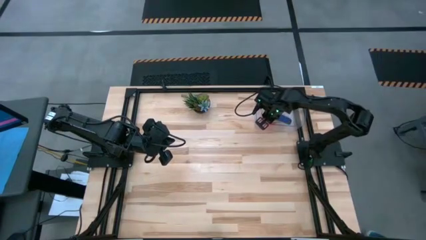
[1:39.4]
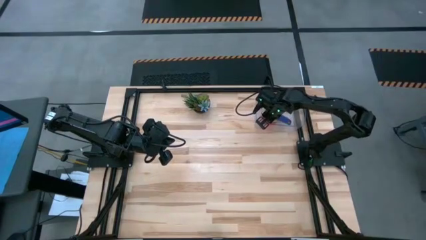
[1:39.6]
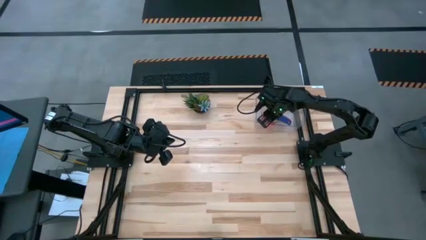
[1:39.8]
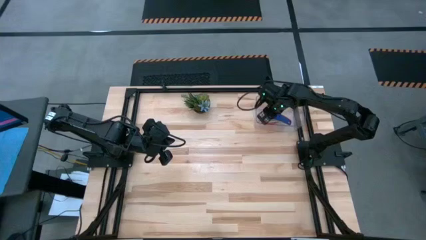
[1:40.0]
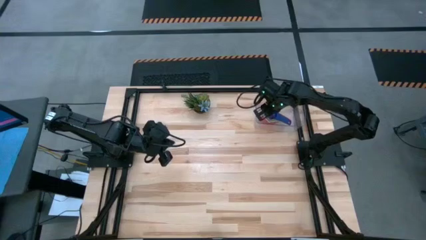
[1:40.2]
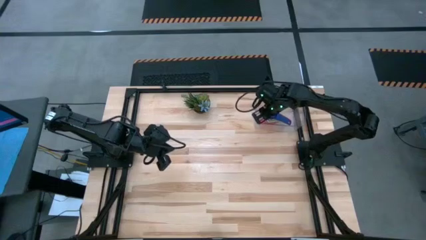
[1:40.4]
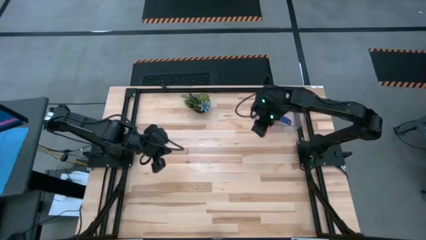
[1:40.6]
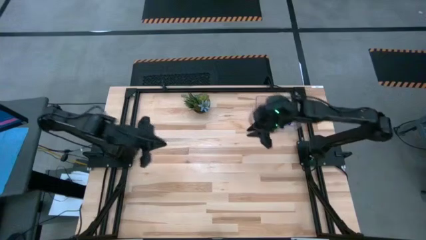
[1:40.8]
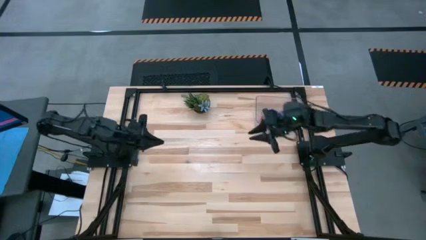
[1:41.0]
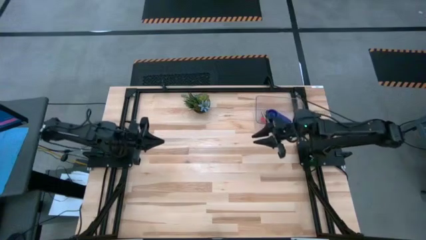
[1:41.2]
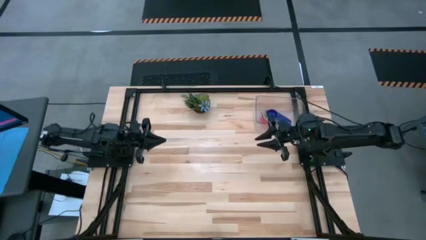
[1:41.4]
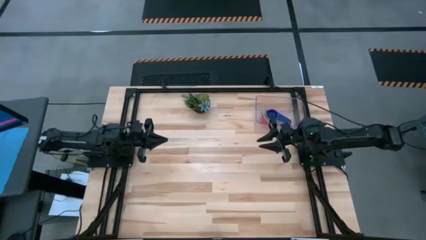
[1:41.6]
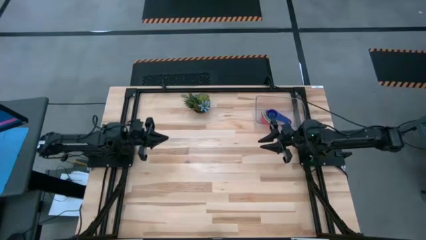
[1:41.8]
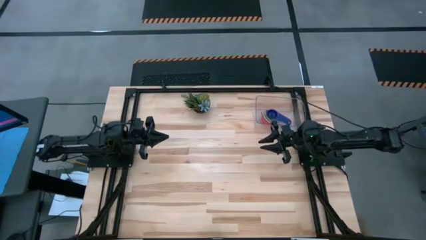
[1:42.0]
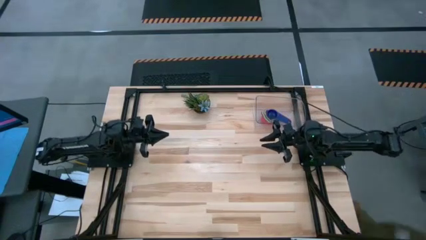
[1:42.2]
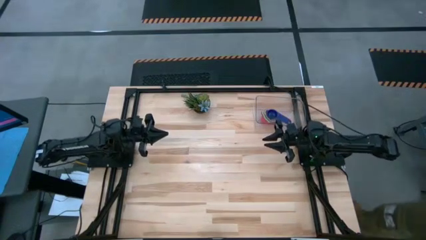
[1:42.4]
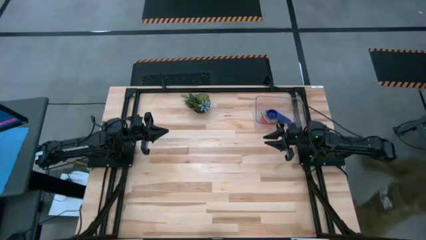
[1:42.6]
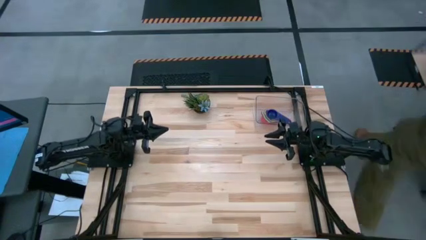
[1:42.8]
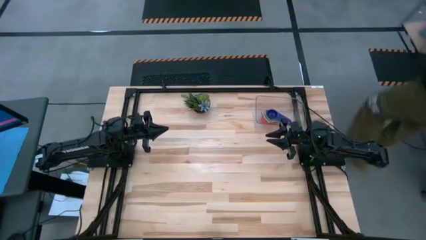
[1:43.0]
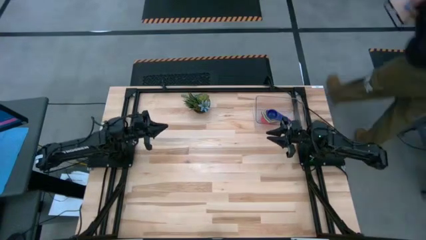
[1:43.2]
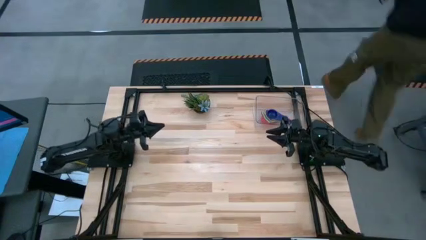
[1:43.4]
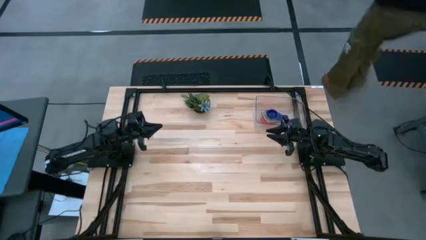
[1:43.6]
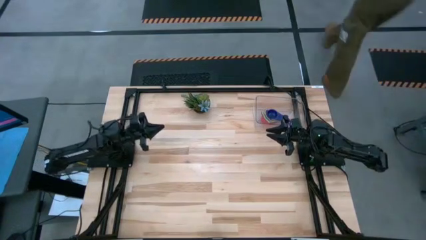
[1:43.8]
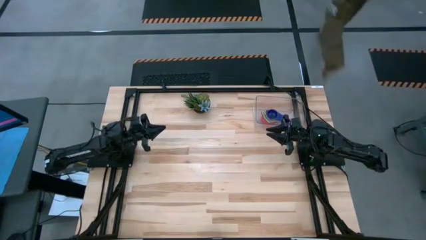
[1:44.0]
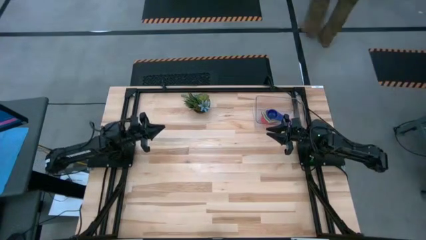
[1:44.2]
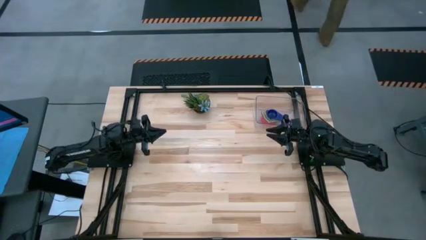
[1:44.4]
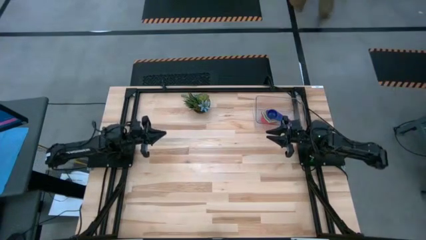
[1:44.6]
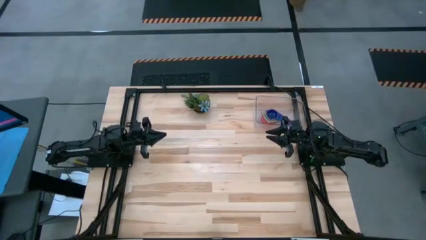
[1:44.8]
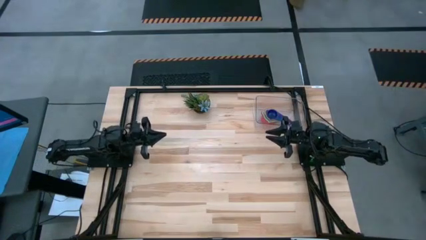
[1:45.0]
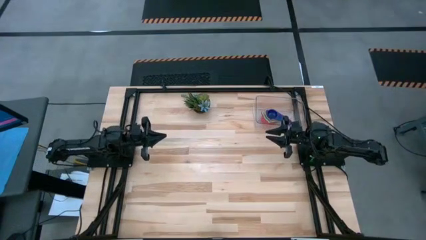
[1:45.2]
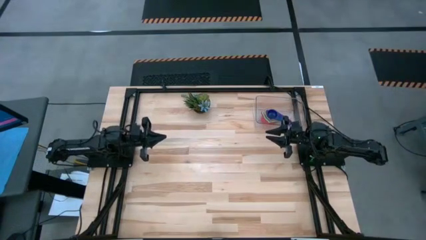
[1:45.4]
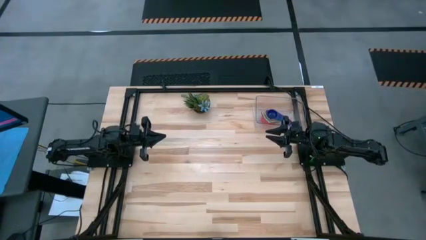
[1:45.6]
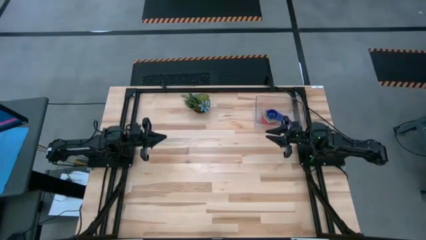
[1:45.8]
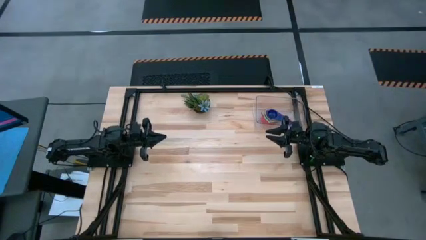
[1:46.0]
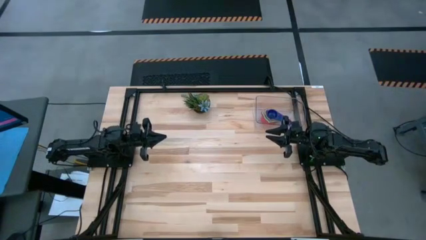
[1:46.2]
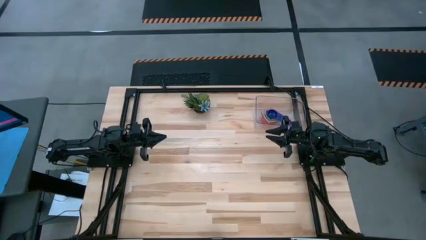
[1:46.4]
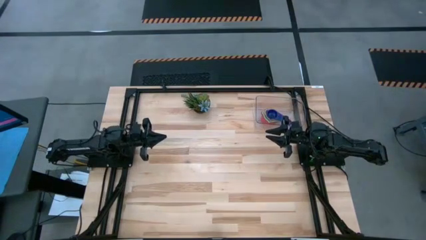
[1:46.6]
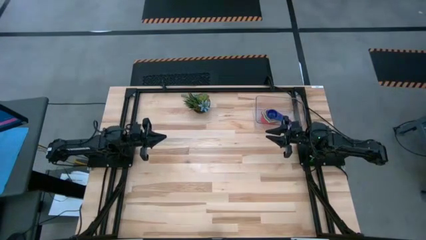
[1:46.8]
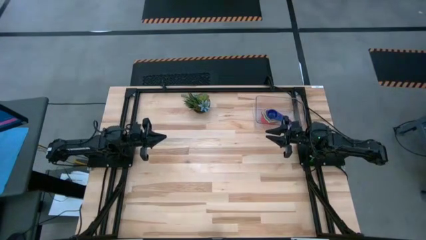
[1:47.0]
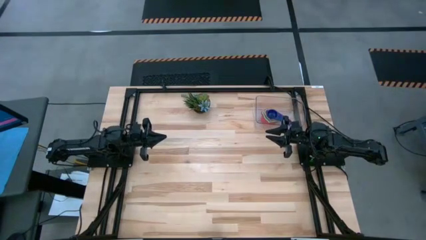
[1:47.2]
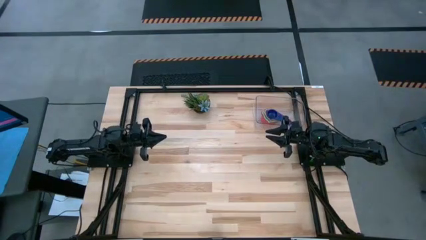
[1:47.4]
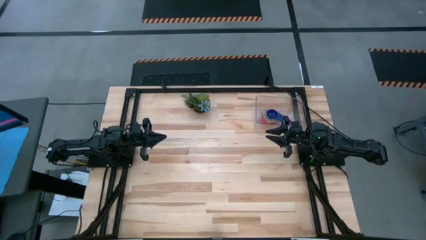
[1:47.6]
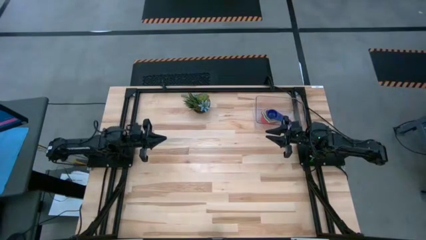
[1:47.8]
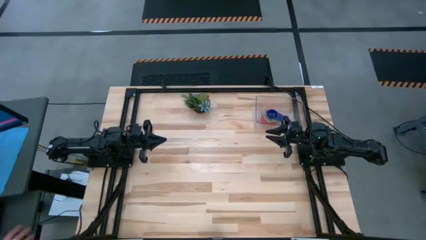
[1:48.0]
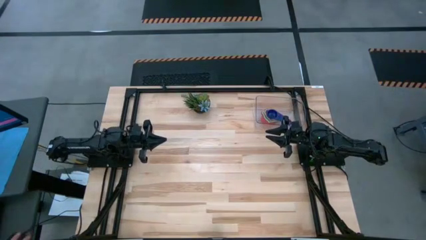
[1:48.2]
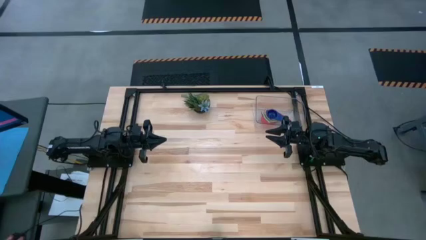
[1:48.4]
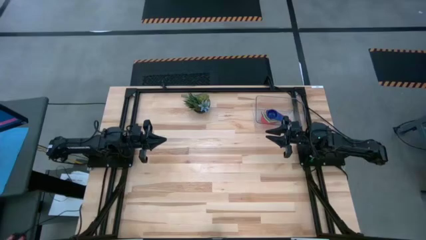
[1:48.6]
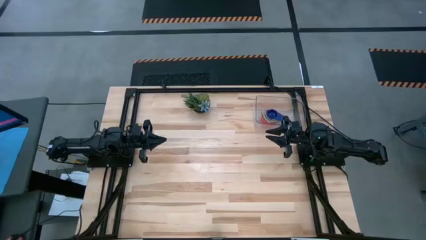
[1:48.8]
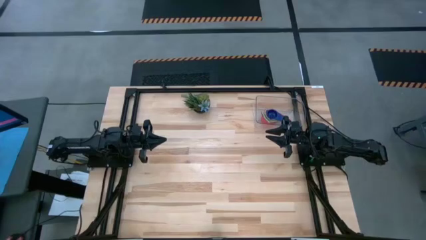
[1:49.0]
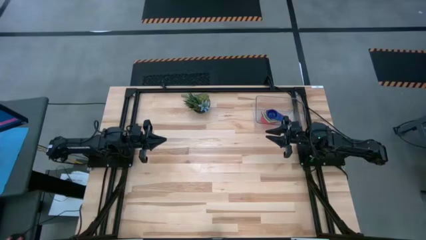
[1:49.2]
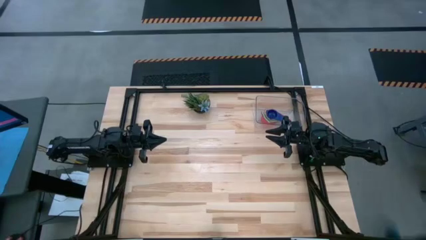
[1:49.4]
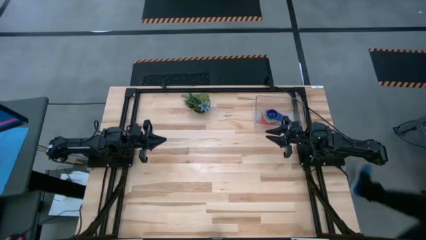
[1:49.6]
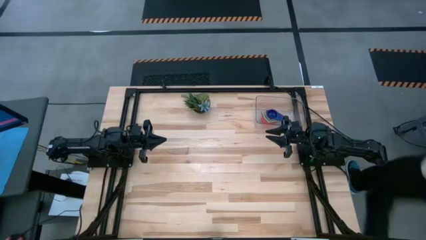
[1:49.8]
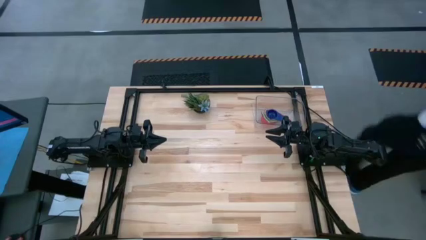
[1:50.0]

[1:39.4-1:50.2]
Task: Nest measuring cups in basket
Return to Home Position

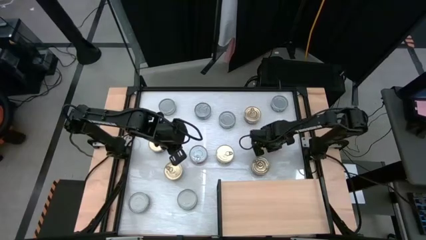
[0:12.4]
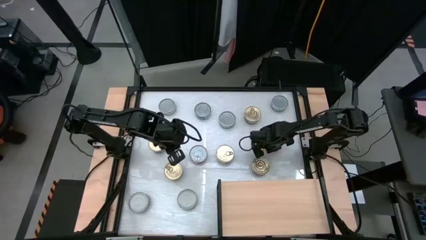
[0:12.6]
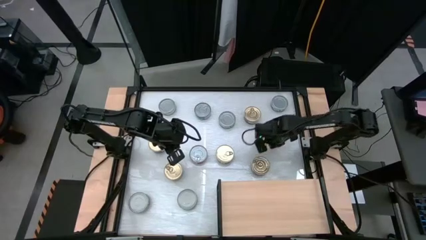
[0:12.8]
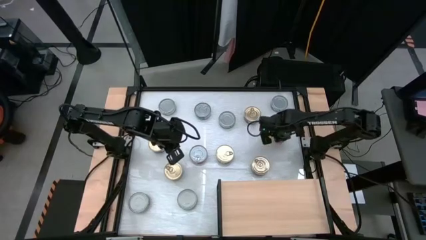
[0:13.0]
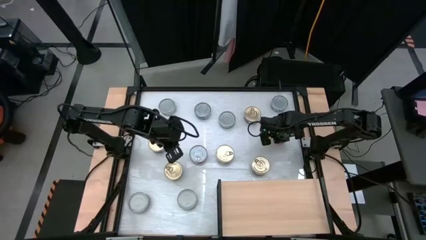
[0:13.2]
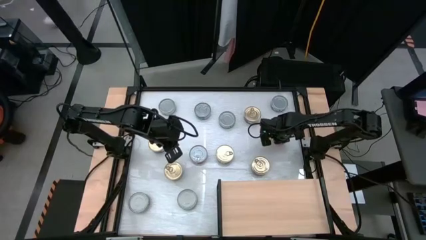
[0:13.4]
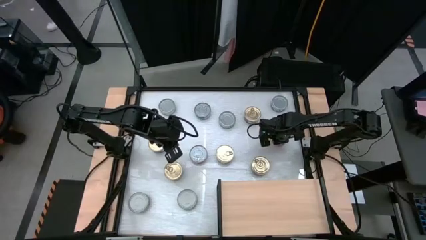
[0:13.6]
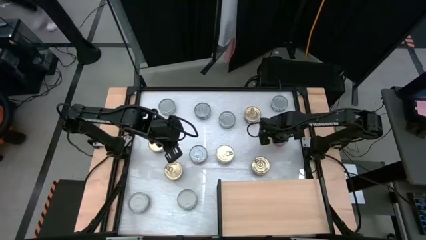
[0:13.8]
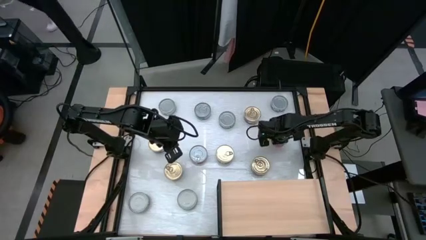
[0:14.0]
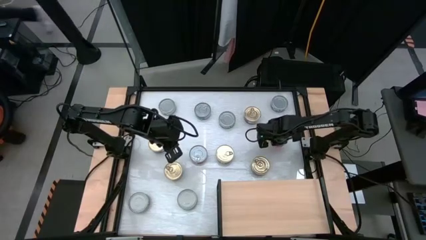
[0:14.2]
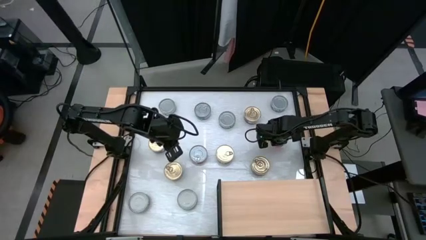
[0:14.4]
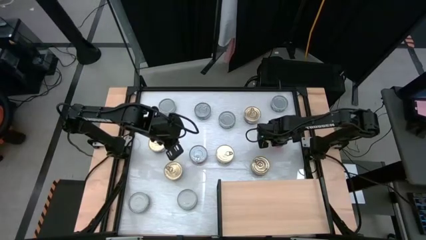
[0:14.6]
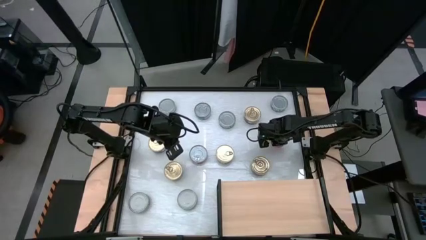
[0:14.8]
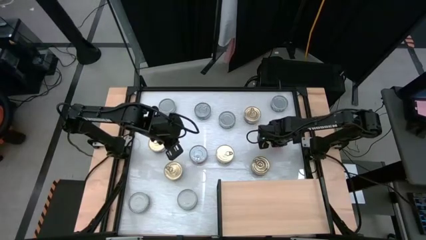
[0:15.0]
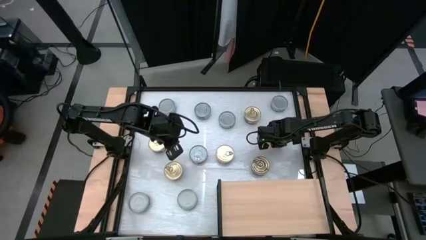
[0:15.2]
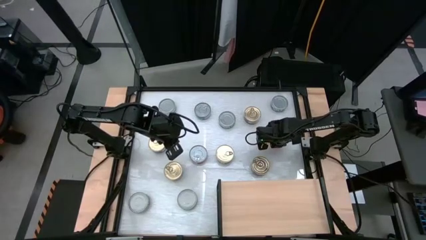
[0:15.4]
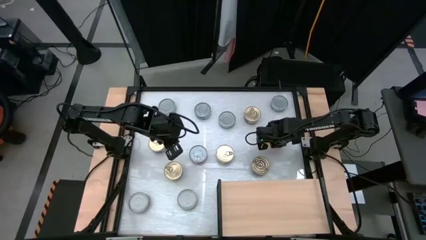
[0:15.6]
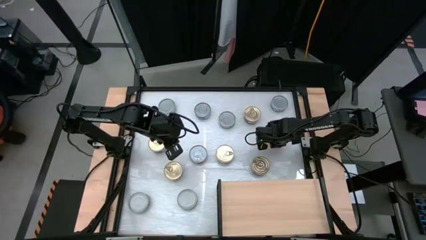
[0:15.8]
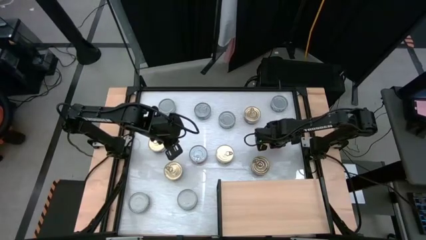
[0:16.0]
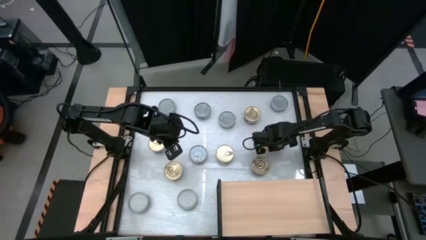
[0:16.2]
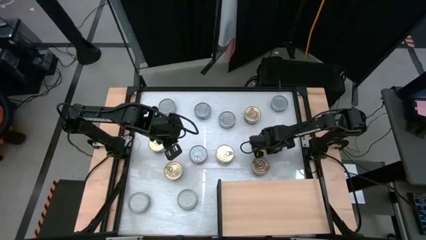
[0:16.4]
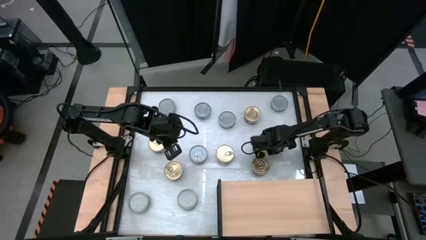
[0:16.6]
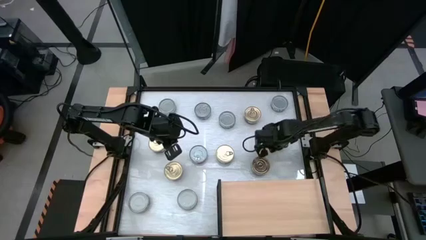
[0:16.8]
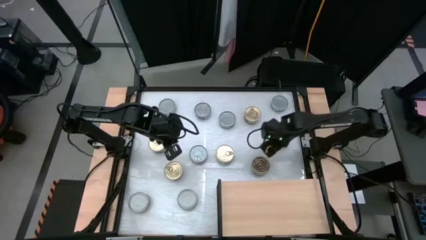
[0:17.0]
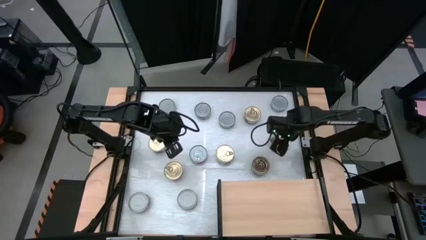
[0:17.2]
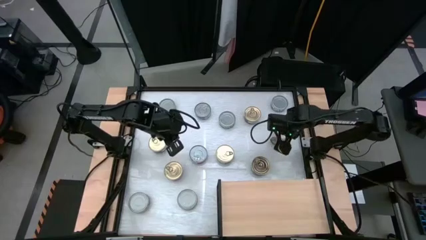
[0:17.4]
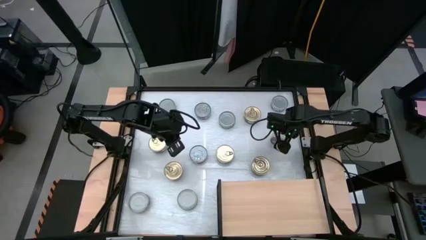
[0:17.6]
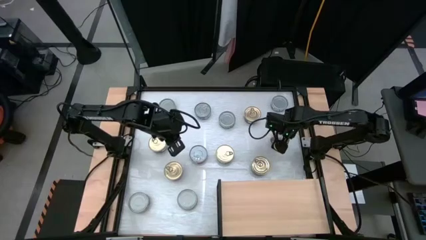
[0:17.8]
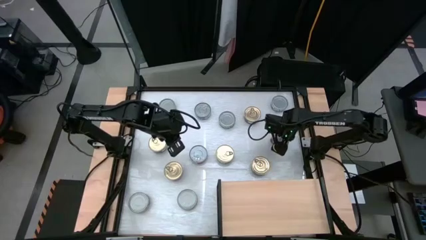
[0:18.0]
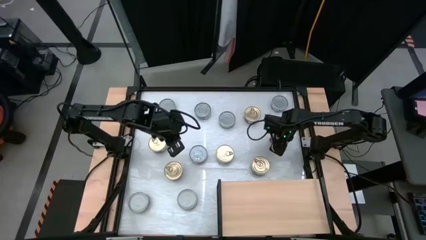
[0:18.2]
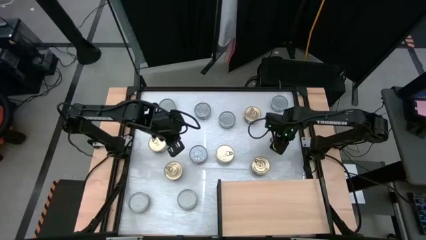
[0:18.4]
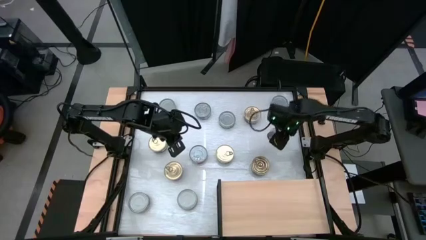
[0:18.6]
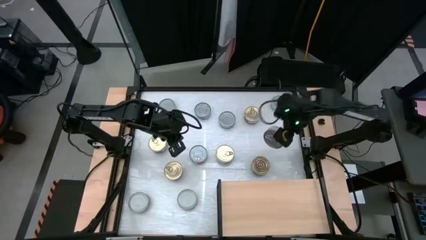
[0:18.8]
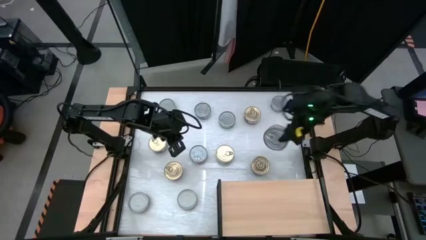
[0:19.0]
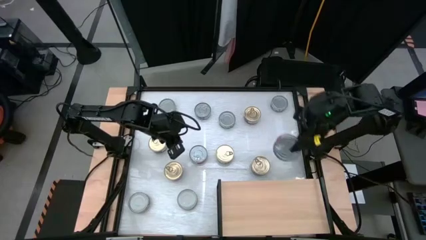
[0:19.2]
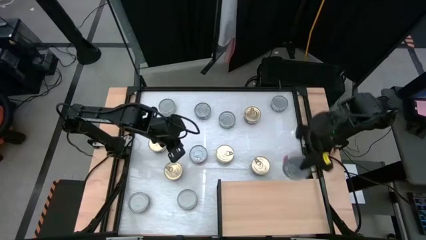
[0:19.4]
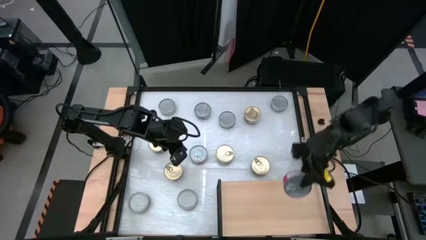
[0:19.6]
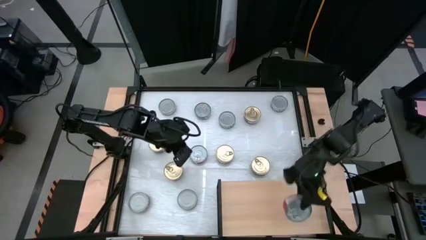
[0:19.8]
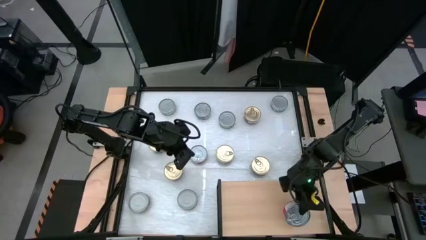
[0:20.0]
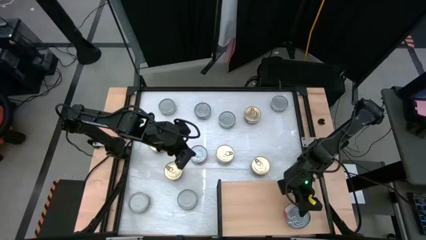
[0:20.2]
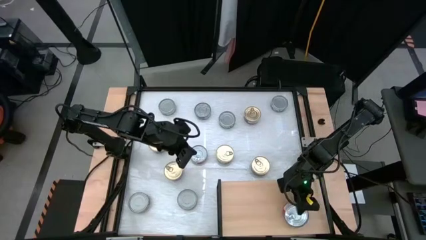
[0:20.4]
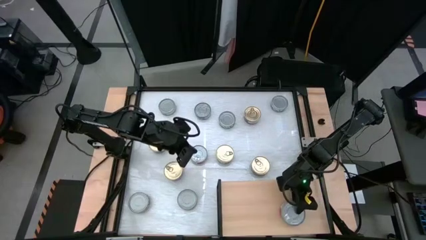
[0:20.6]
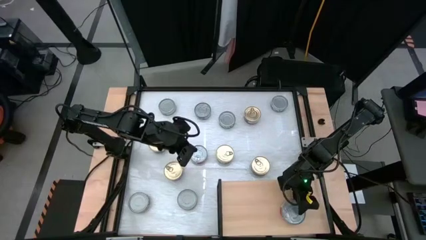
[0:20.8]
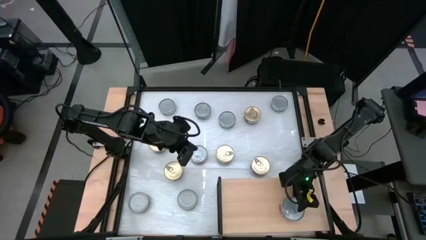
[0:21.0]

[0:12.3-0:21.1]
Task: Stack canned seafood by type on shelf
Put the red tuna can on the shelf
